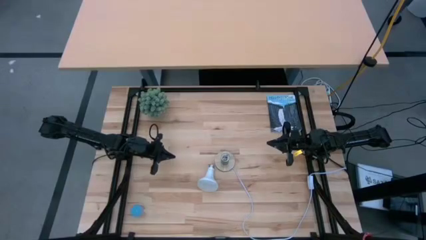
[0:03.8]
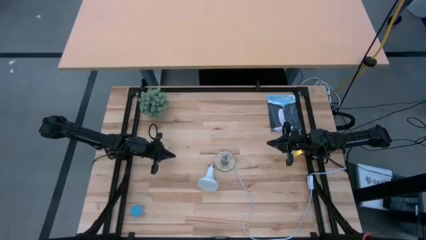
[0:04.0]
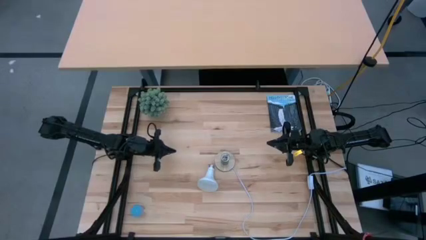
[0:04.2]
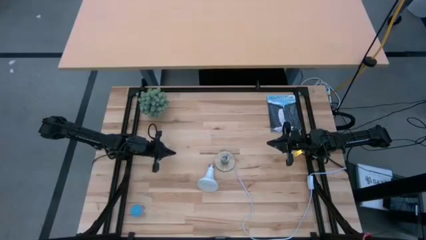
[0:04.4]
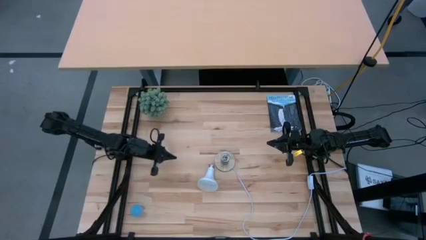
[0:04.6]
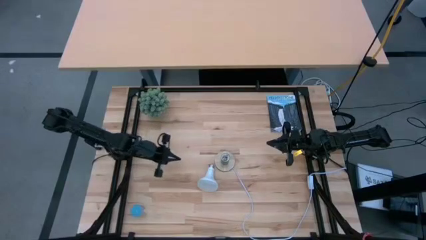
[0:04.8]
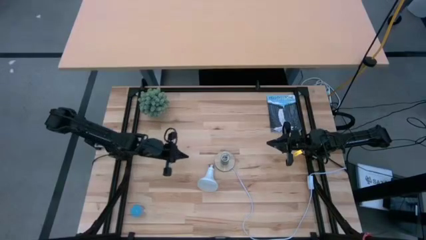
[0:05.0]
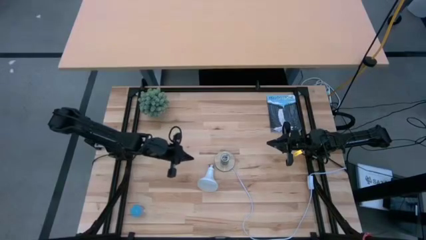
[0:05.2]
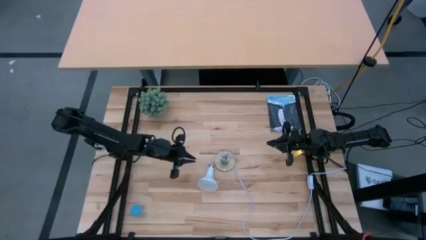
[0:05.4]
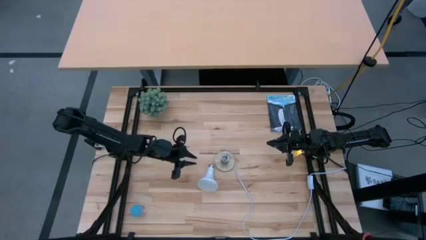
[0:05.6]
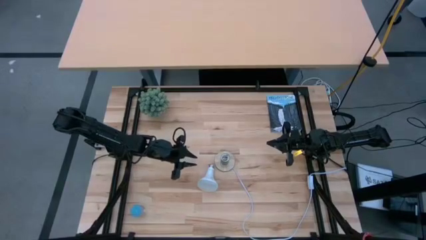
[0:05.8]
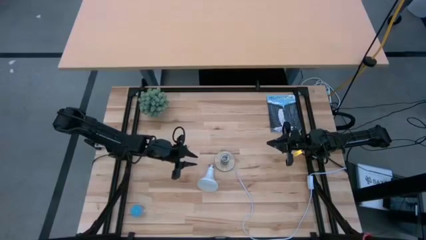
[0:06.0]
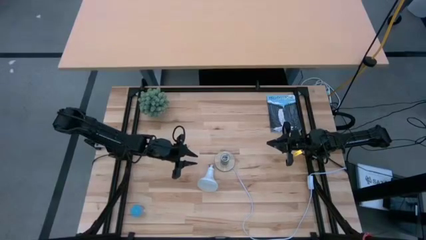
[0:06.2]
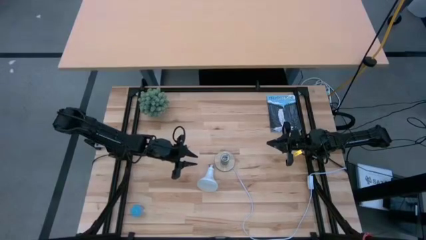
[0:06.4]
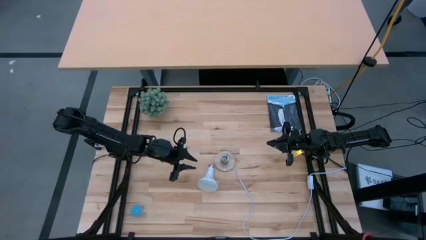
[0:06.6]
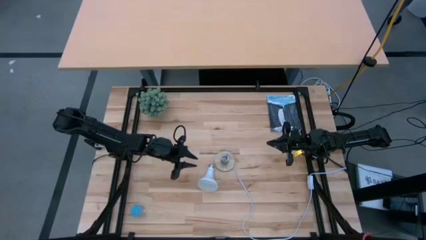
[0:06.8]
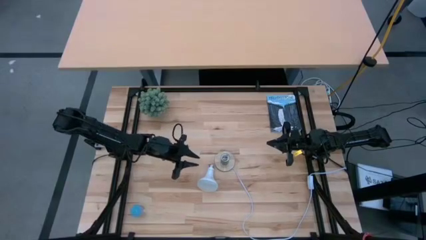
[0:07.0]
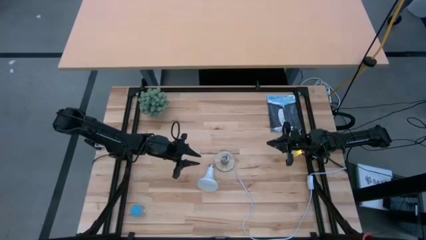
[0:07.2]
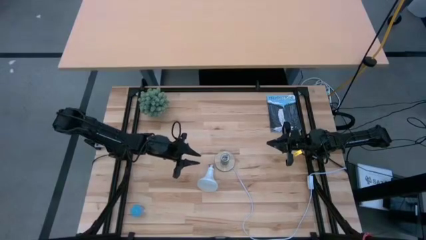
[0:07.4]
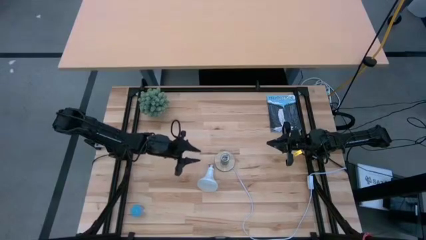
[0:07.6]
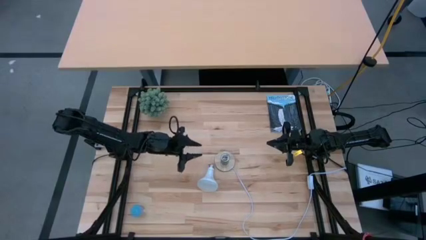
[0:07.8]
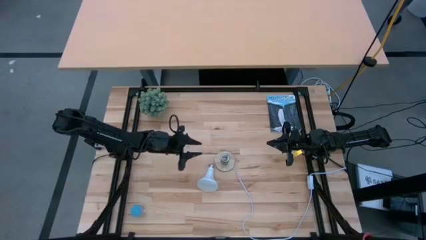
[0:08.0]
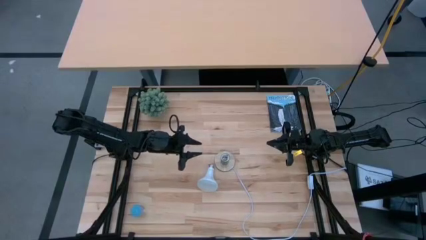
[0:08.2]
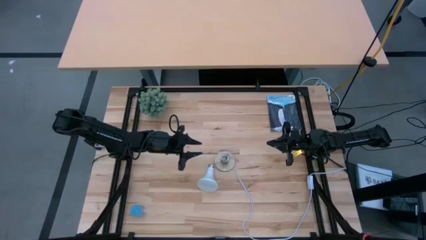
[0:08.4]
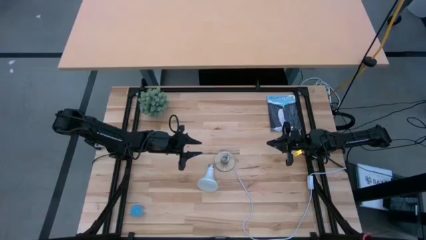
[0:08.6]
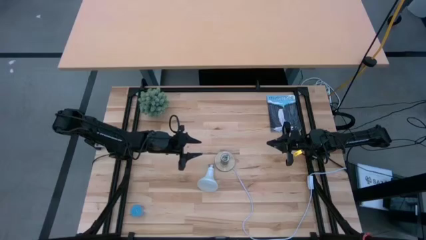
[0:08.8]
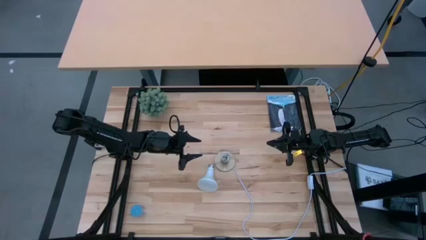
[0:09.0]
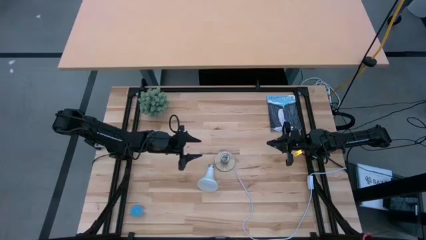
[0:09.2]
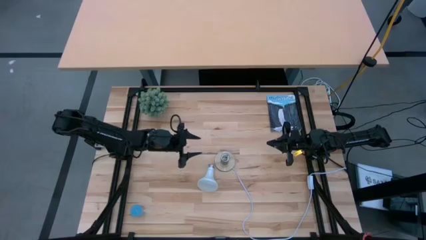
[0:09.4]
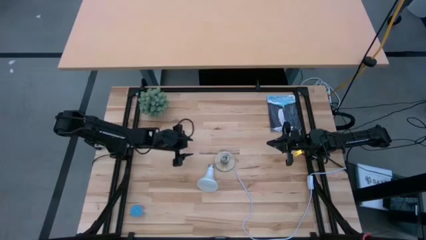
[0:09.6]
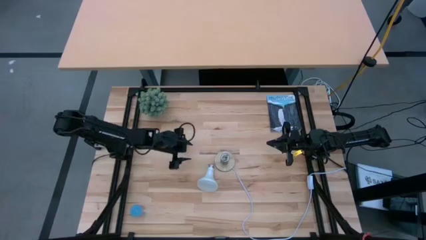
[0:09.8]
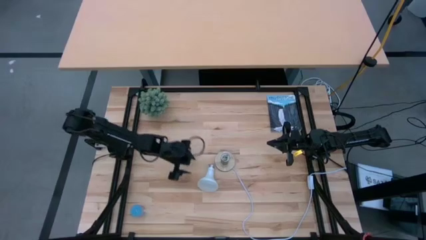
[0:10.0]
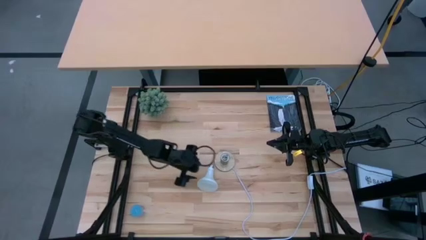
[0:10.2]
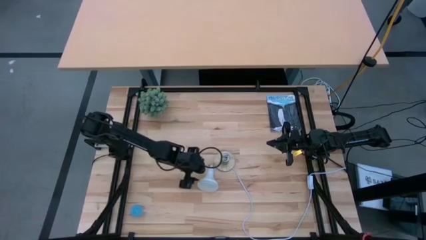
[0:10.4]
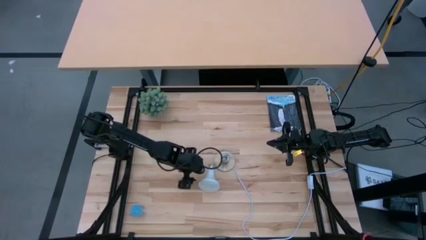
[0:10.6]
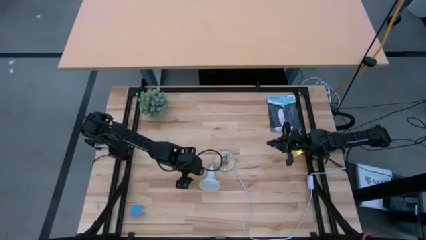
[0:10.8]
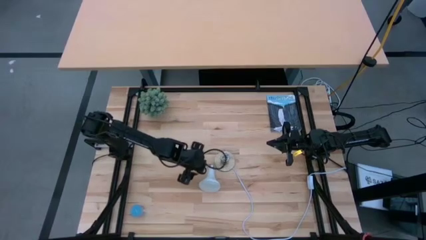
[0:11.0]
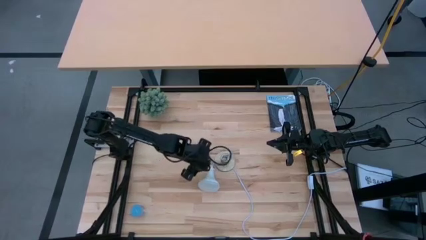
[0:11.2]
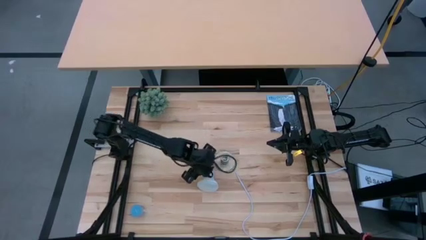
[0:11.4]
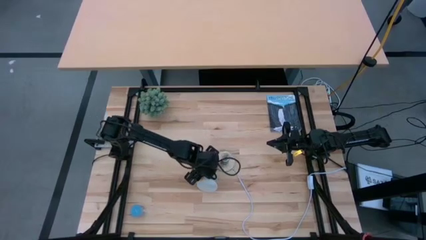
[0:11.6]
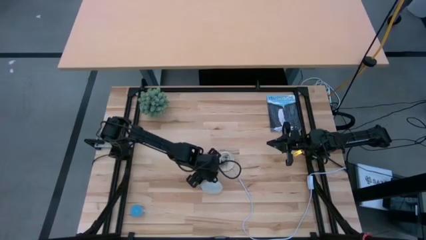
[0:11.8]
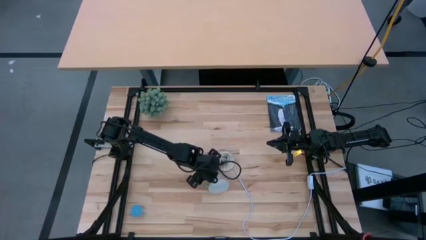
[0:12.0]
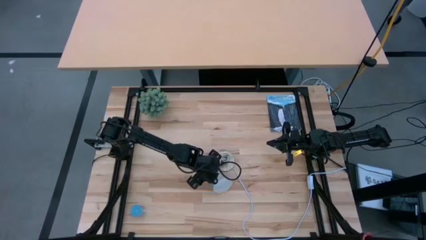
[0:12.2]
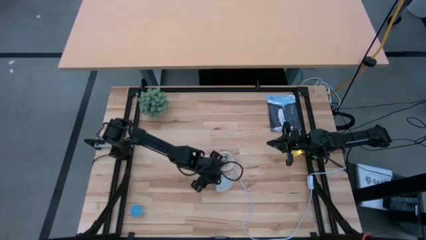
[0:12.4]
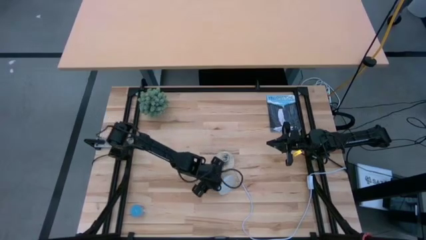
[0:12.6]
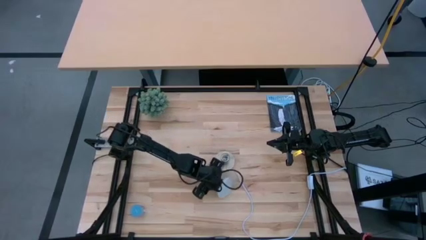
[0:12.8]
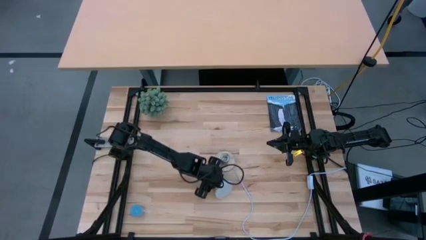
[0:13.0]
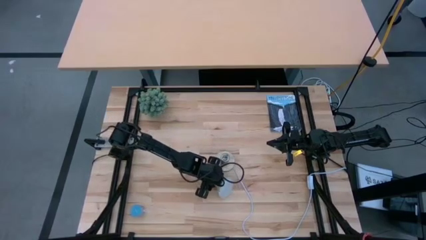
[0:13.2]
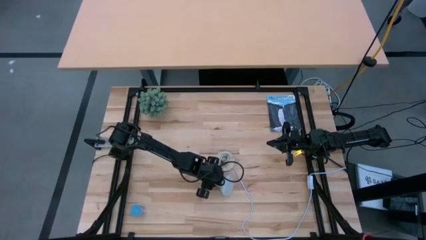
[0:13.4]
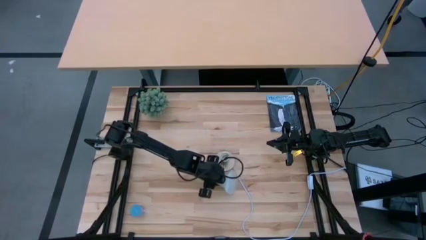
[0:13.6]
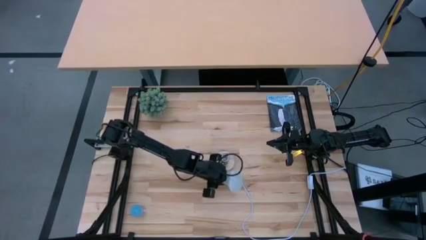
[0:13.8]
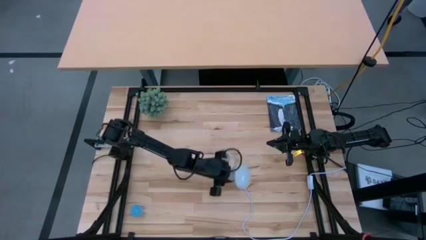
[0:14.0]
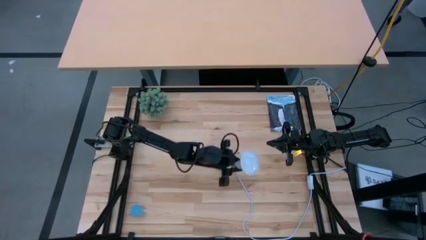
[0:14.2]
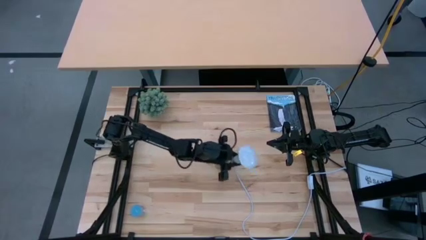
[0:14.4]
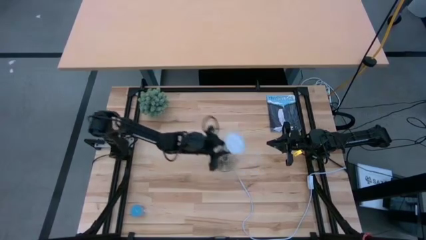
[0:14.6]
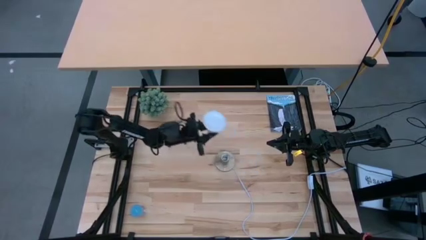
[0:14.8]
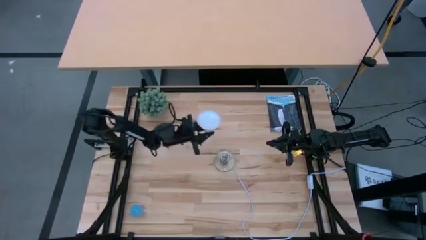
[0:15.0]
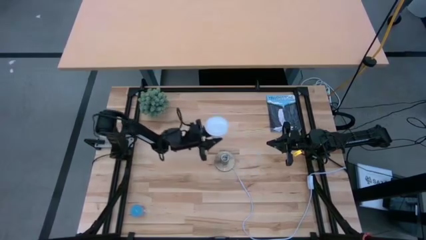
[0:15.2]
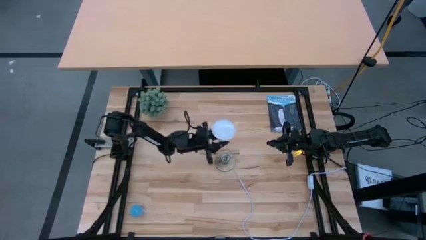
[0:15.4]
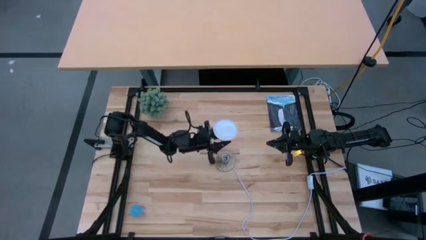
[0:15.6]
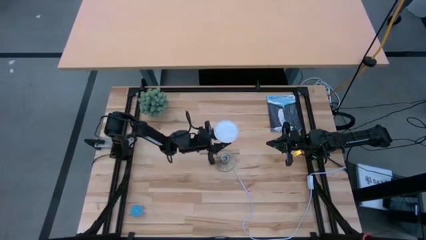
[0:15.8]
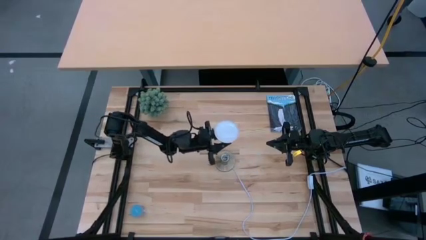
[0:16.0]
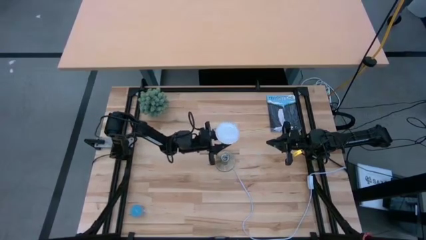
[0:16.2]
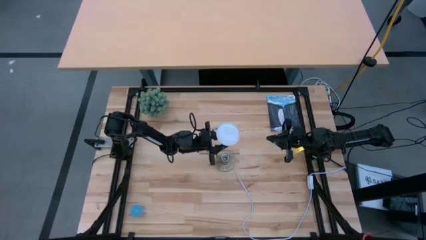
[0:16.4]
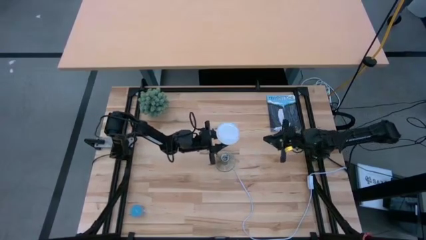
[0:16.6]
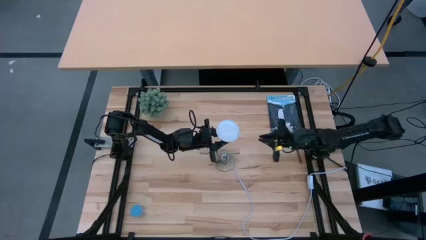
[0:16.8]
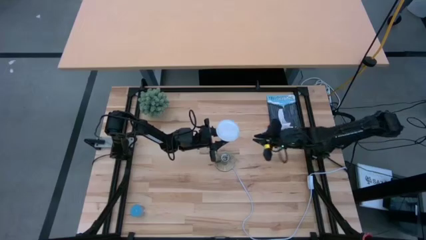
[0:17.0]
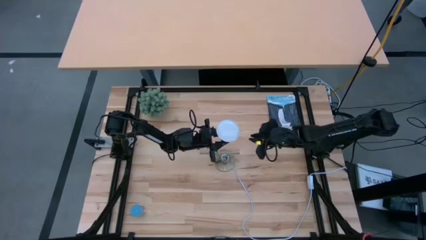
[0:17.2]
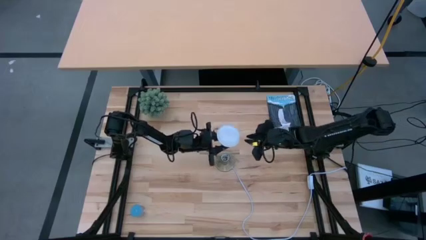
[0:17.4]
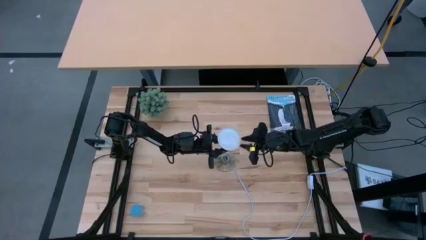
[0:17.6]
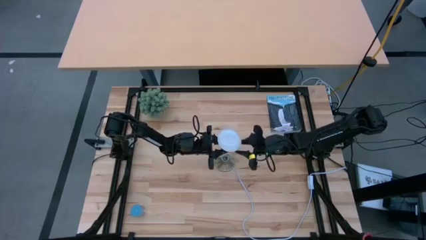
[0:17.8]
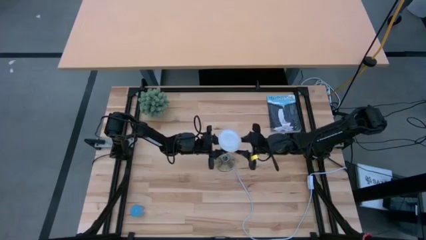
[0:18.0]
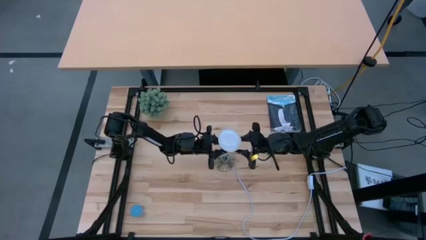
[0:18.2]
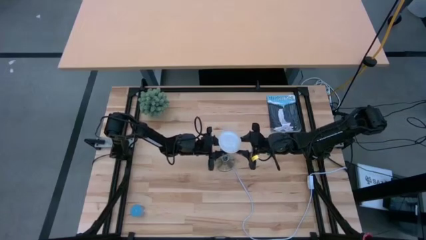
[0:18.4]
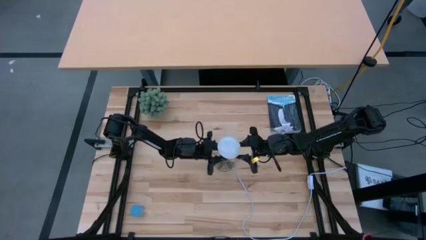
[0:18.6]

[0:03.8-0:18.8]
Task: Screw lightbulb
Insert the lightbulb into the lamp

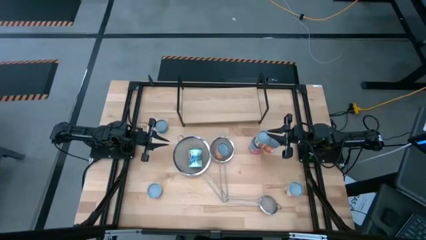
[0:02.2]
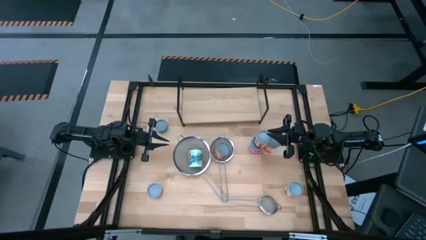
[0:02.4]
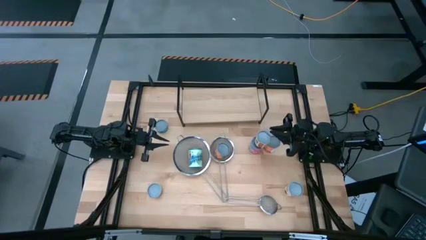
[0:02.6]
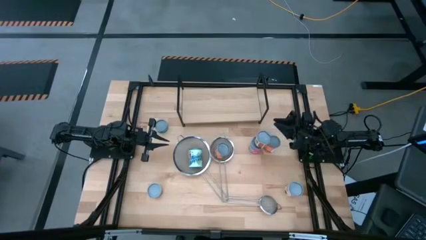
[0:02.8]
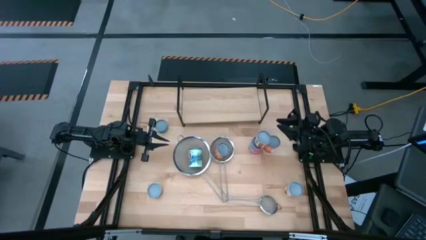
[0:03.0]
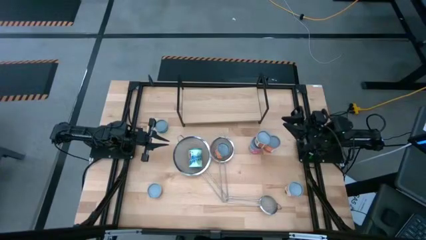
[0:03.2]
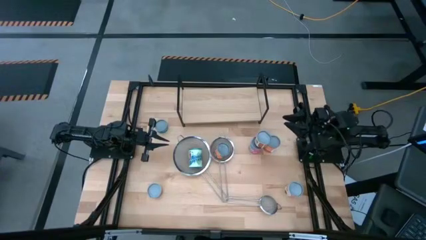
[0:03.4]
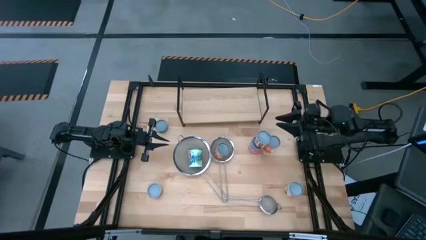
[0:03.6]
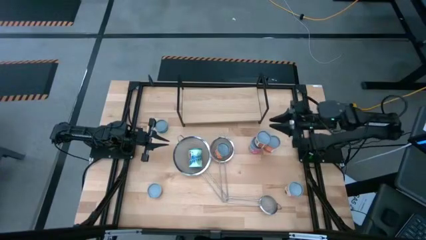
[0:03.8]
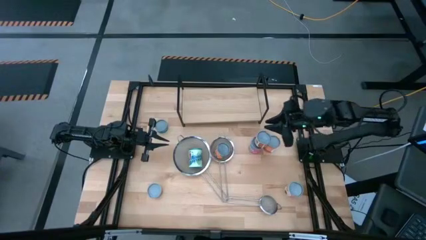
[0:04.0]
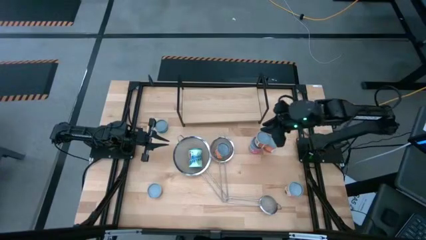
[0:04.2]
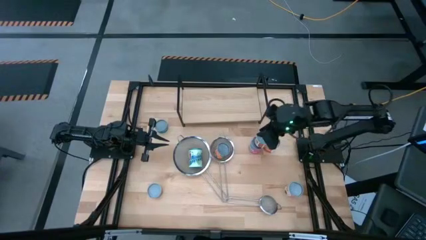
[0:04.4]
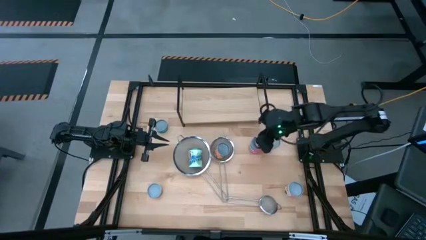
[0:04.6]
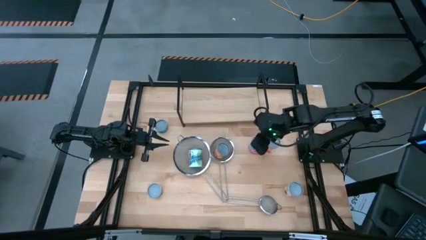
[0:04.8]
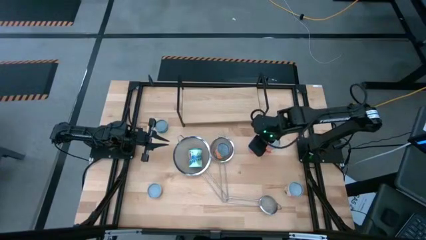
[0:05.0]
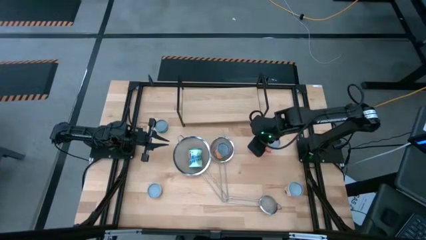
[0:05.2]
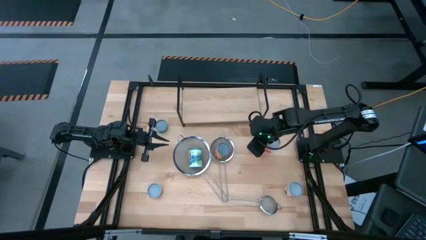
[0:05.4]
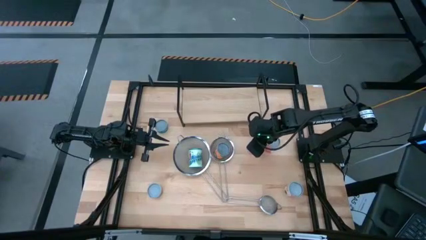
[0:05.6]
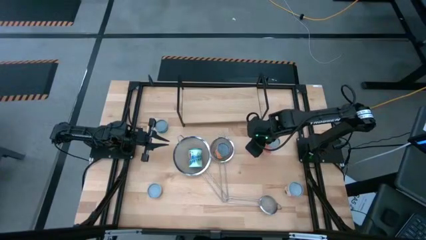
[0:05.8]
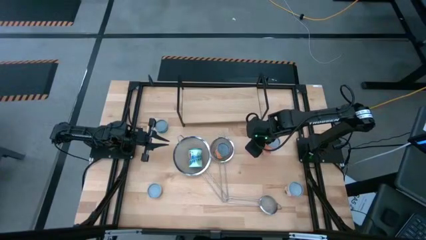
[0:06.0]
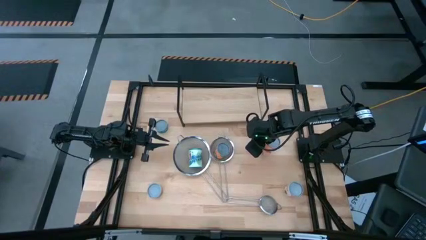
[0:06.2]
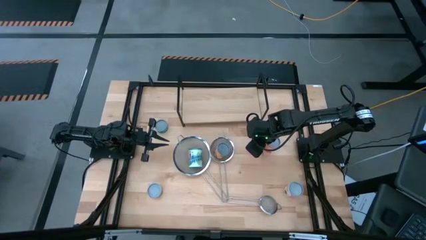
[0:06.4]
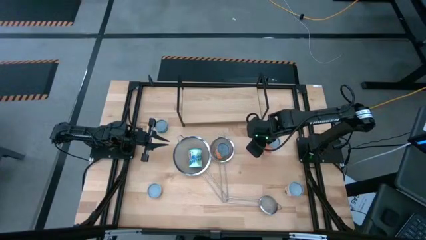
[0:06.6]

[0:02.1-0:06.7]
Task: Pick and place cans onto a shelf
Put the canned diced tomatoes on the shelf
